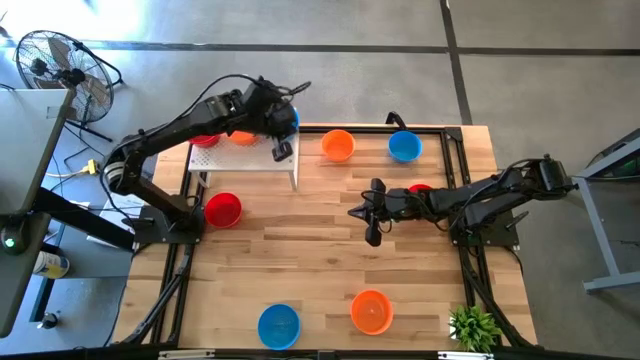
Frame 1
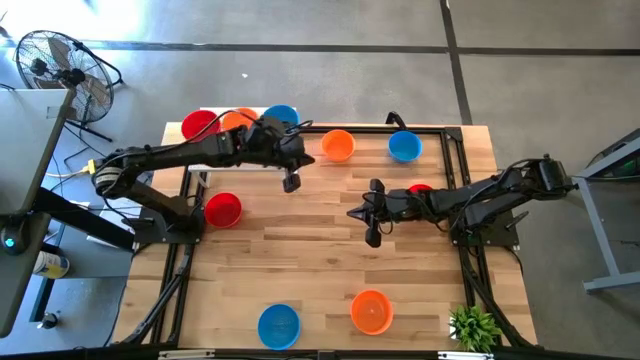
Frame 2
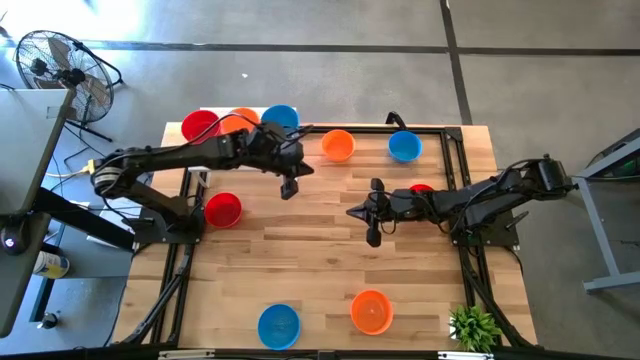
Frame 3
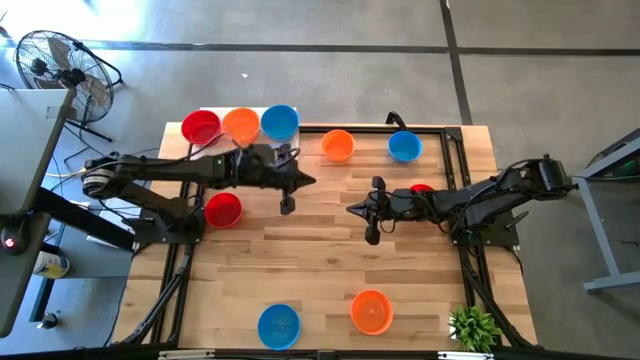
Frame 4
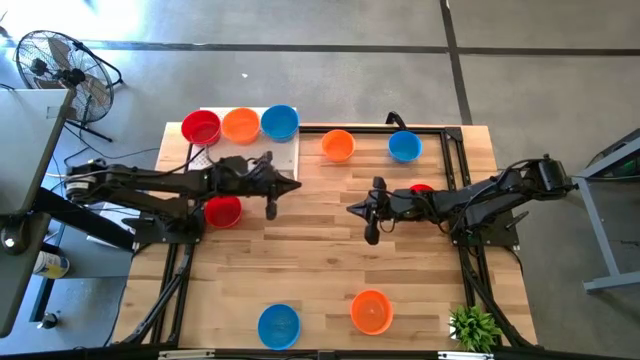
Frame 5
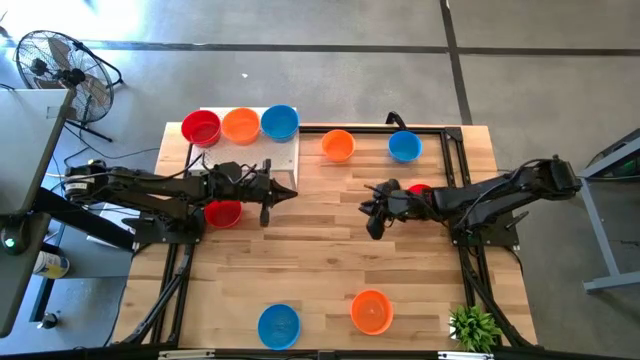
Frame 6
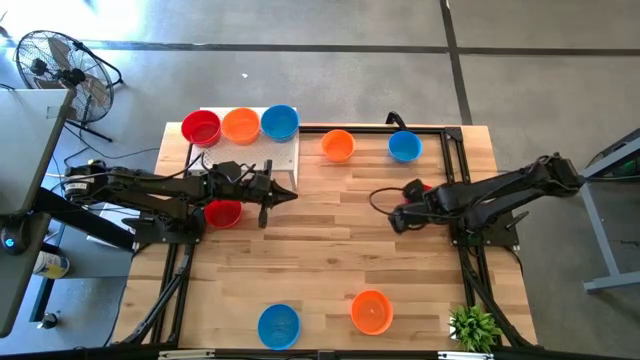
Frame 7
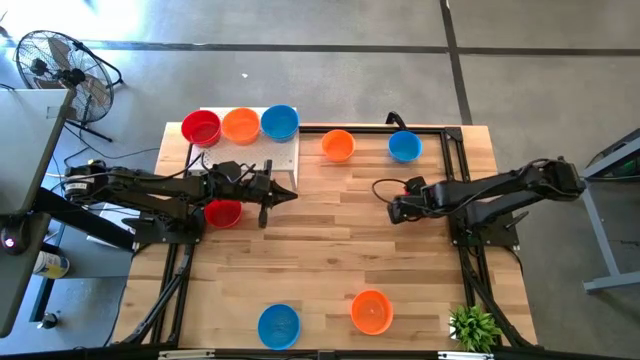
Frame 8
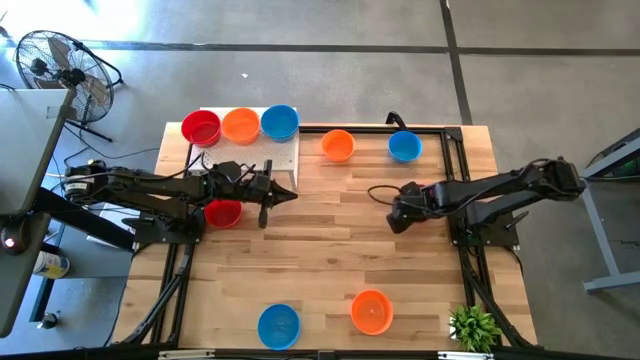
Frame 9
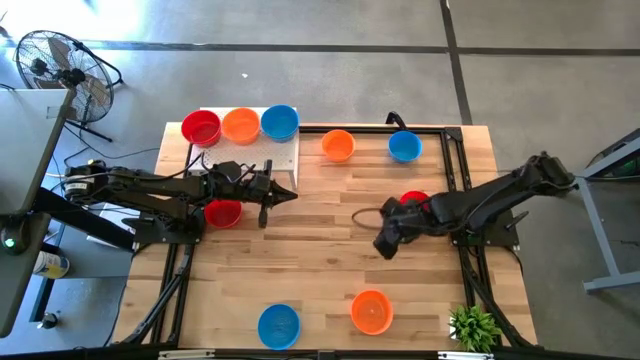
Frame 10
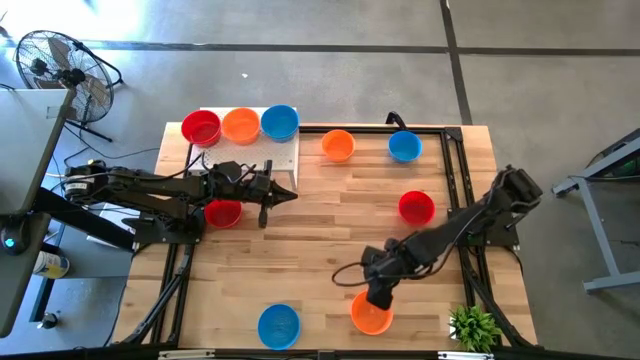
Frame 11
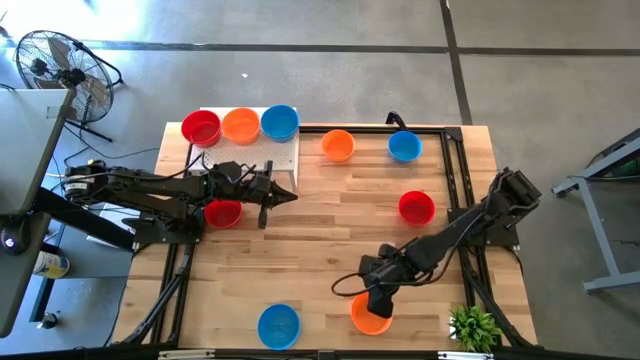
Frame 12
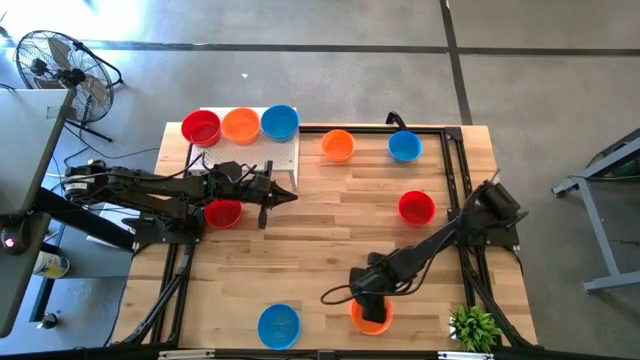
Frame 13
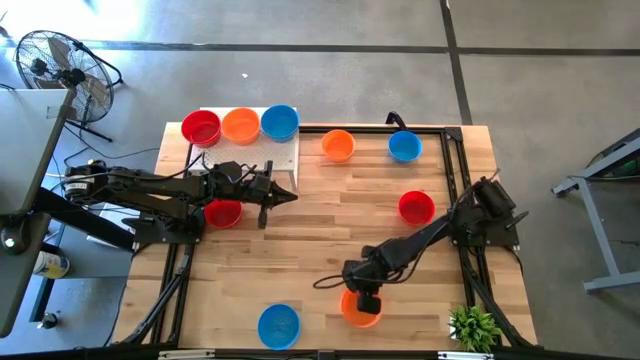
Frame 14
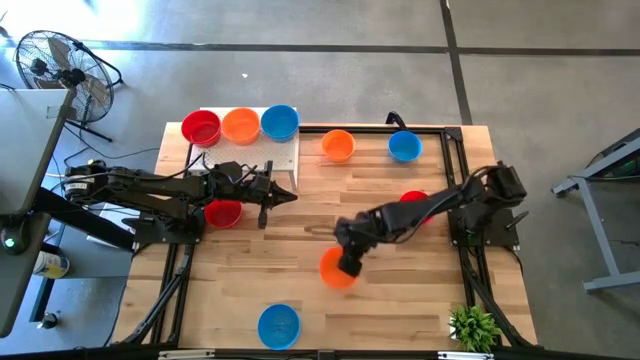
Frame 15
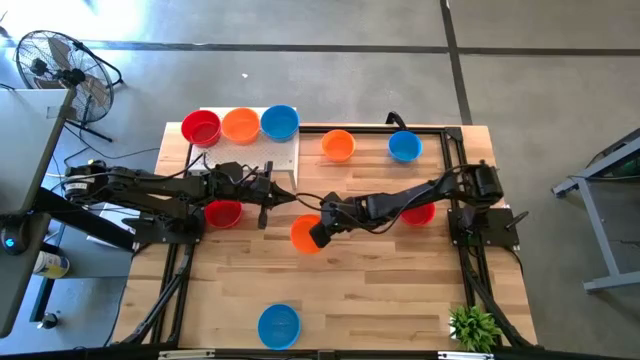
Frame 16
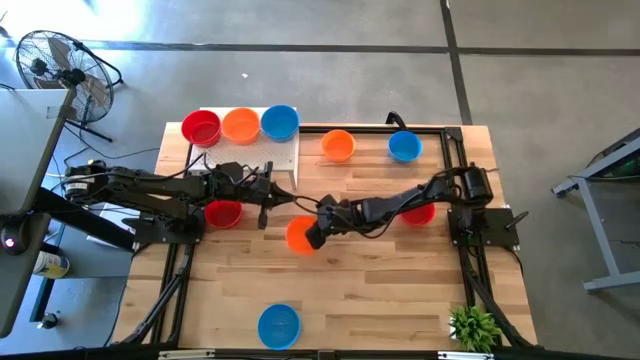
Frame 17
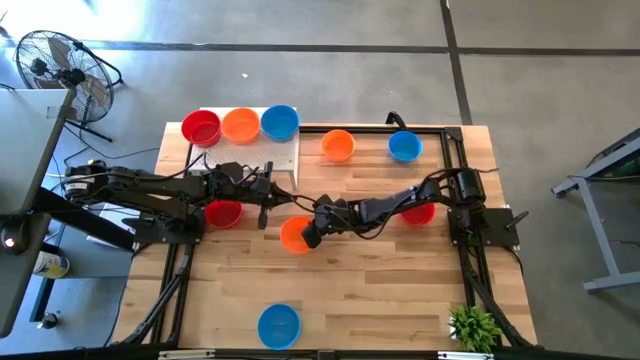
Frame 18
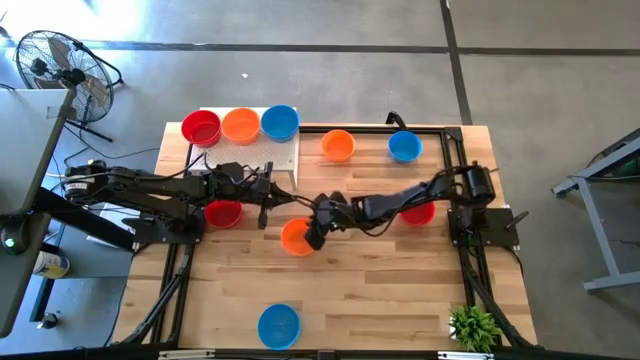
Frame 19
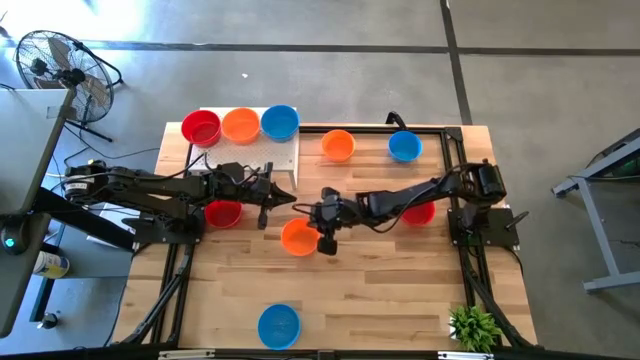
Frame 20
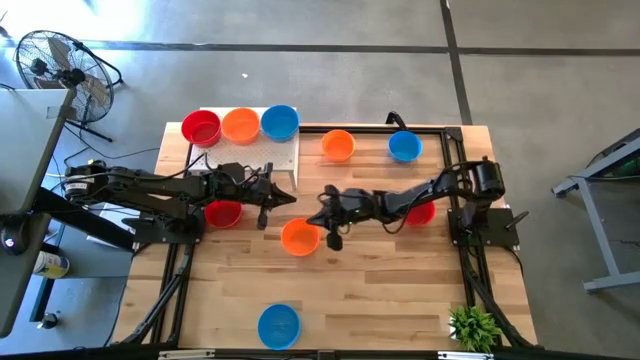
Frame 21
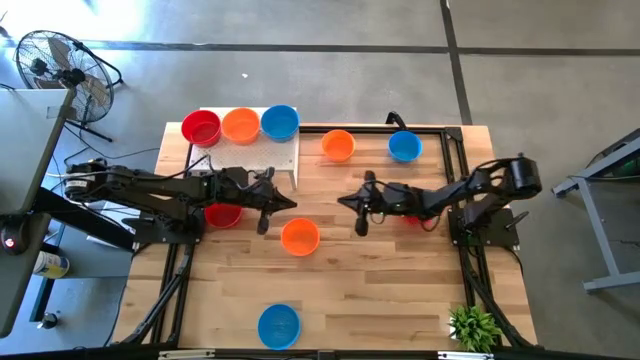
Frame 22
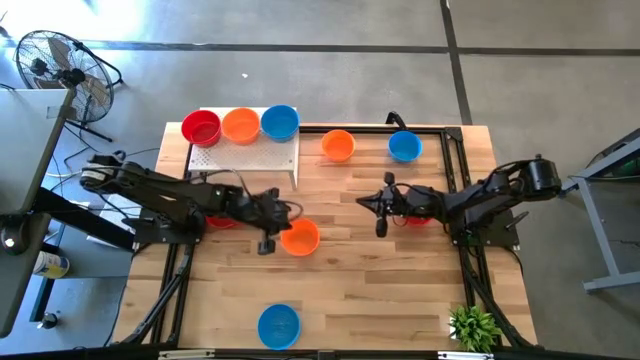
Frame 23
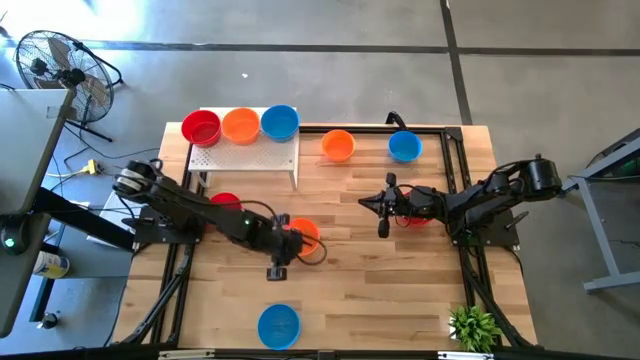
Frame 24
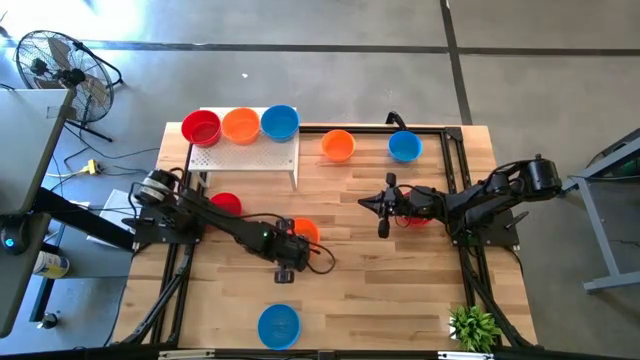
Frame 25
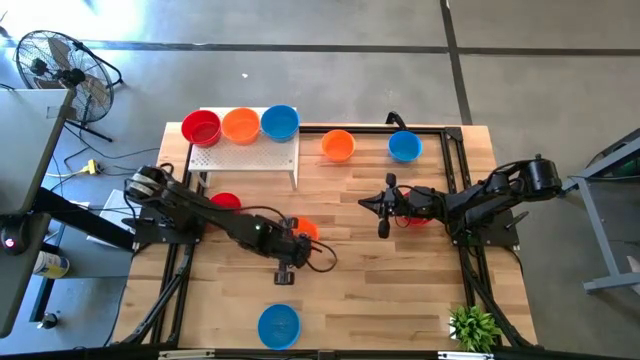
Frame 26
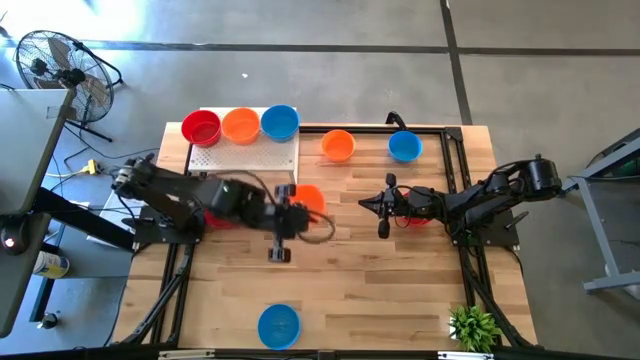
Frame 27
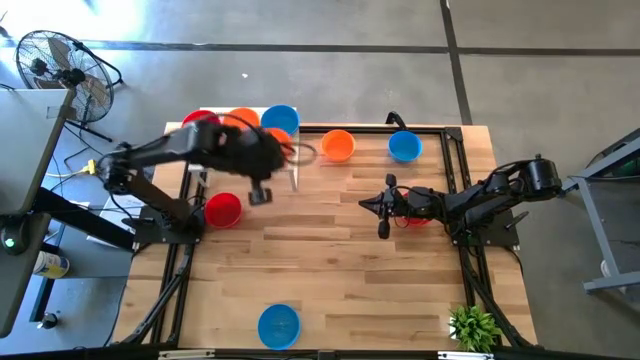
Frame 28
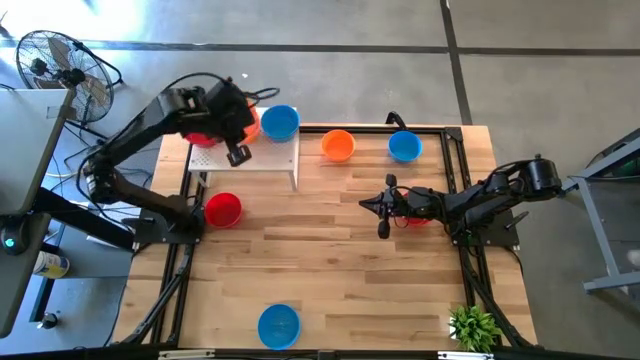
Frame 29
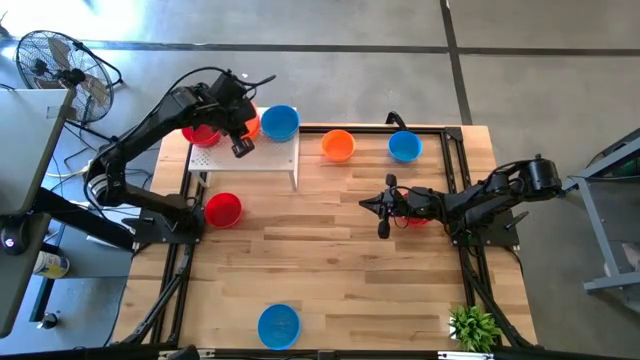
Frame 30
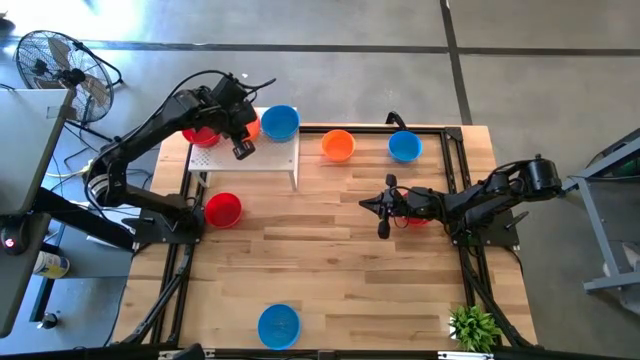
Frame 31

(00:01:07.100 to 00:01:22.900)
Task: Pick & Place Mini bowls
Stack the orange bowl on top of the other orange bowls on the shelf

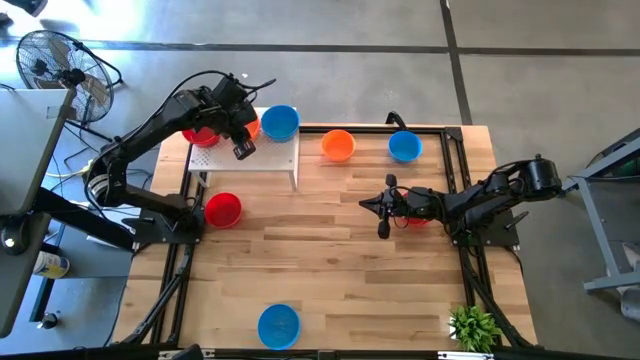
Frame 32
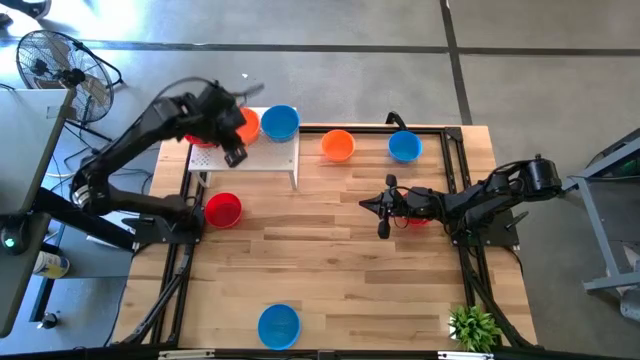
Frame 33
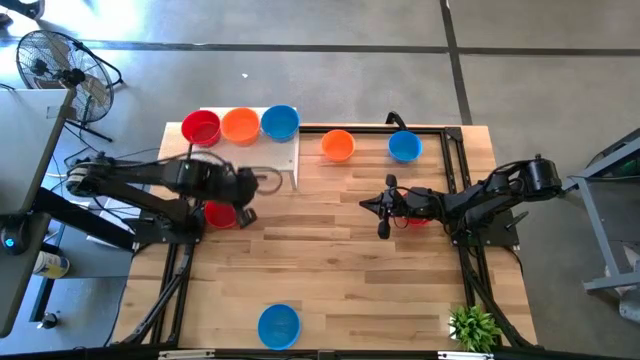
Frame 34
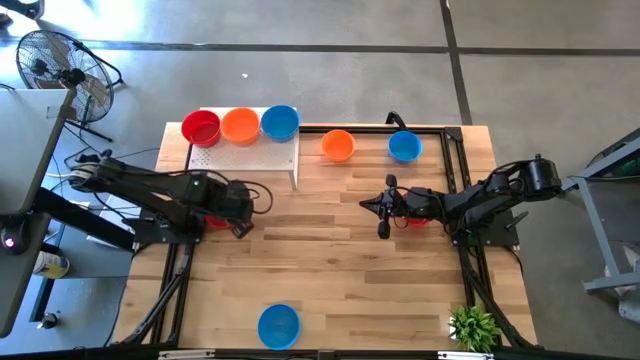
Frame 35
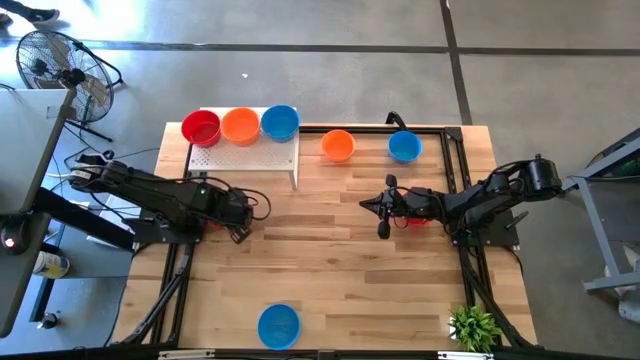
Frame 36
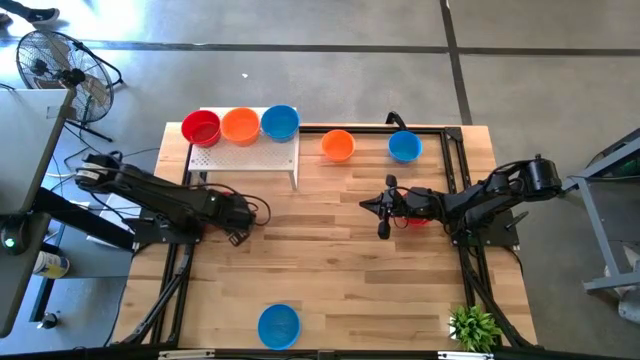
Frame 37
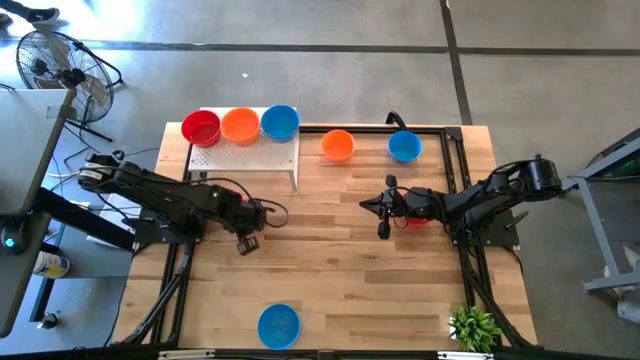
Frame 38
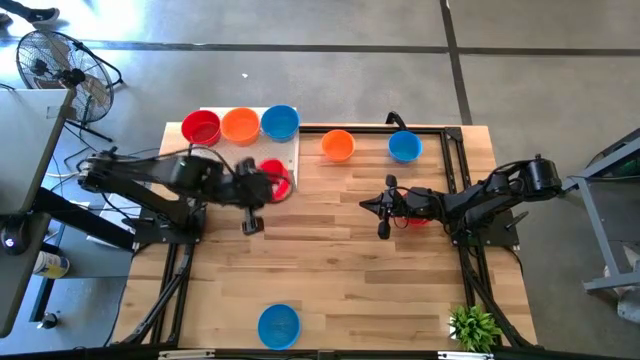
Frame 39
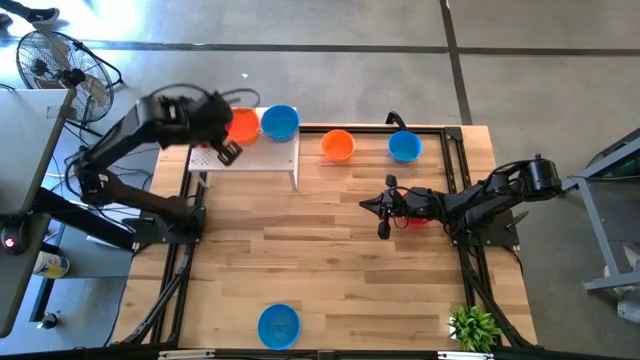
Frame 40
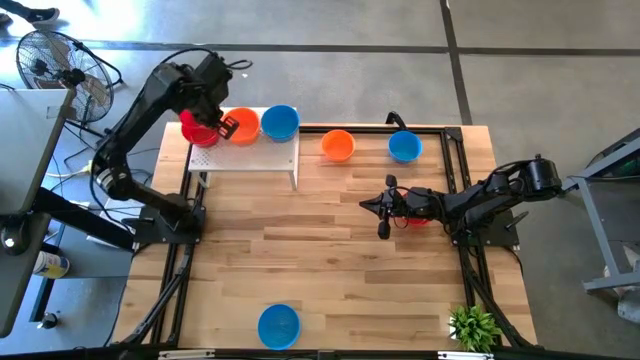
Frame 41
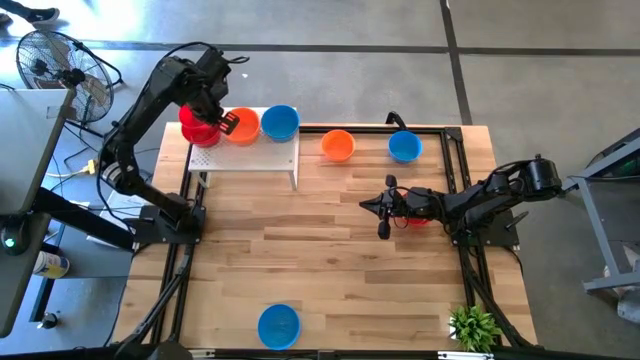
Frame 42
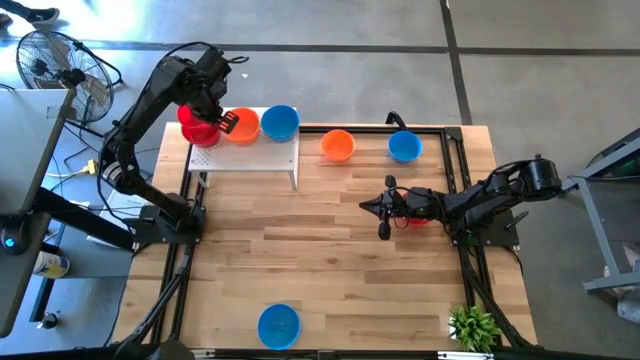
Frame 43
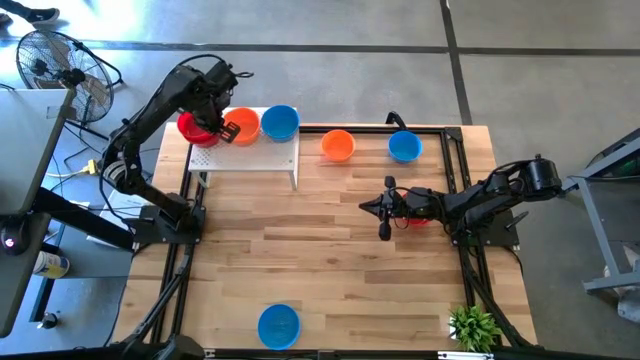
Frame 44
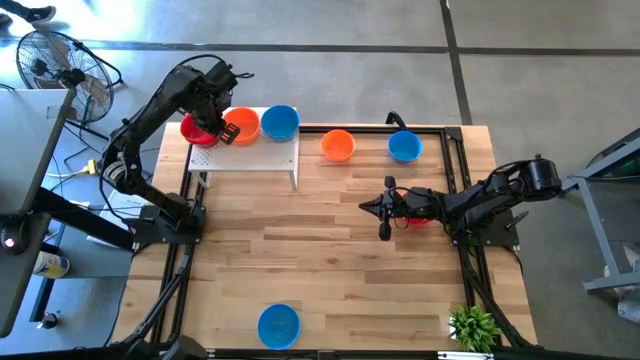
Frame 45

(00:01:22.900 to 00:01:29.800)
Stack the red bowl on top of the other red bowls on the shelf
